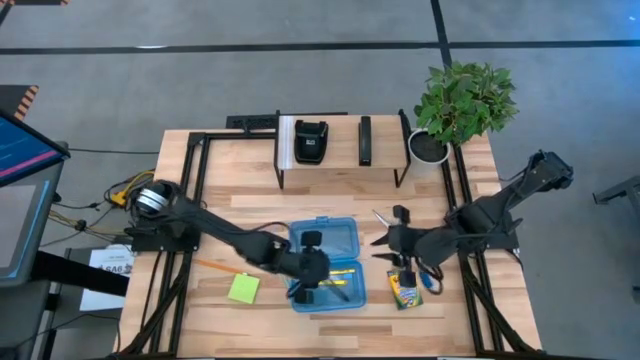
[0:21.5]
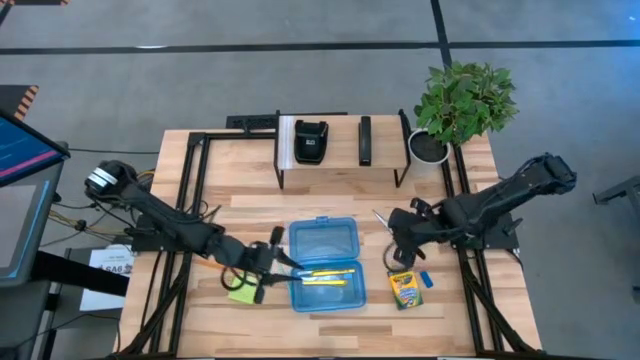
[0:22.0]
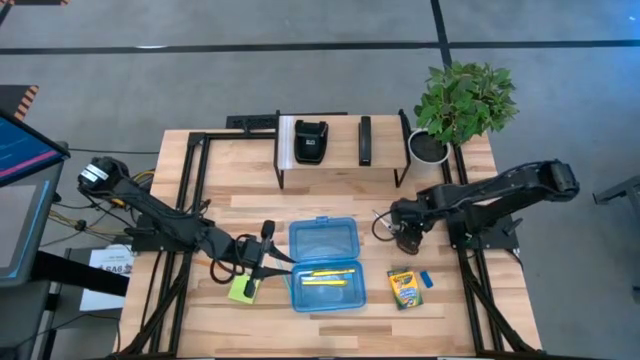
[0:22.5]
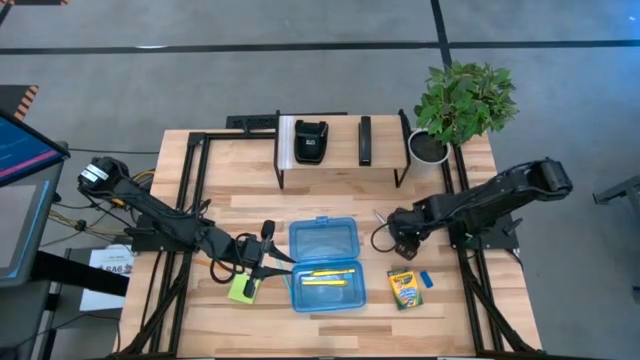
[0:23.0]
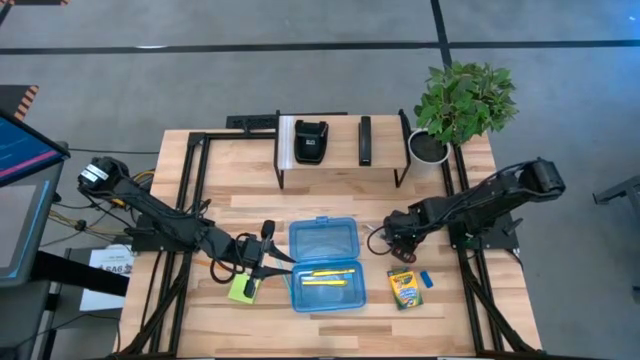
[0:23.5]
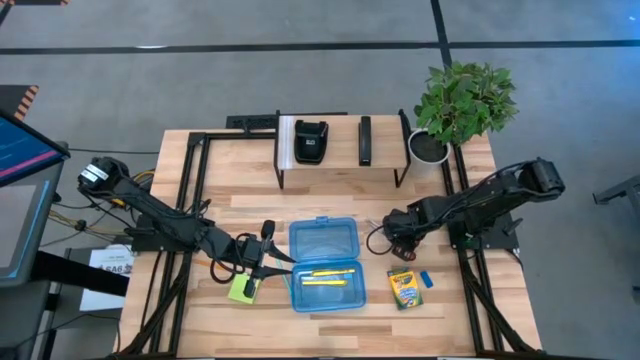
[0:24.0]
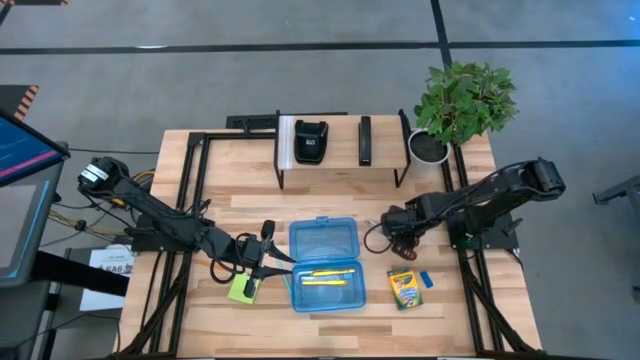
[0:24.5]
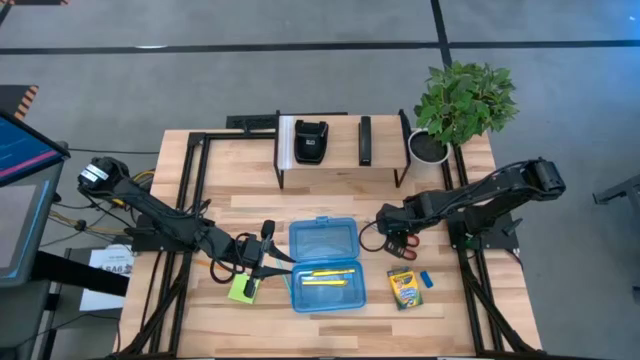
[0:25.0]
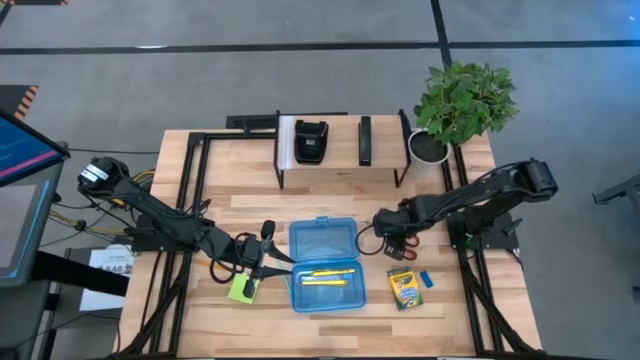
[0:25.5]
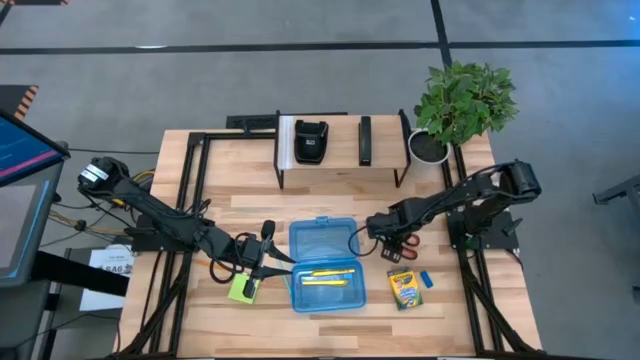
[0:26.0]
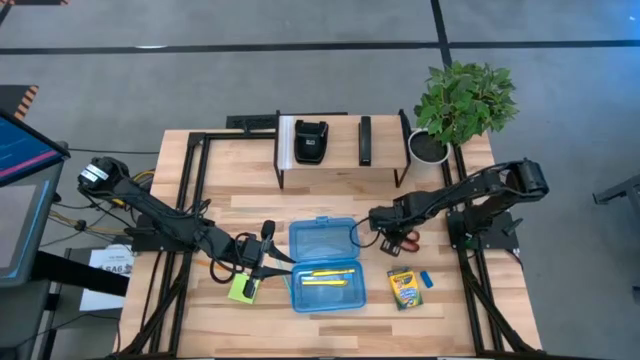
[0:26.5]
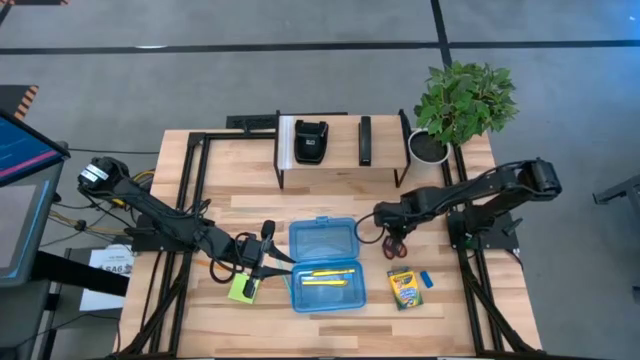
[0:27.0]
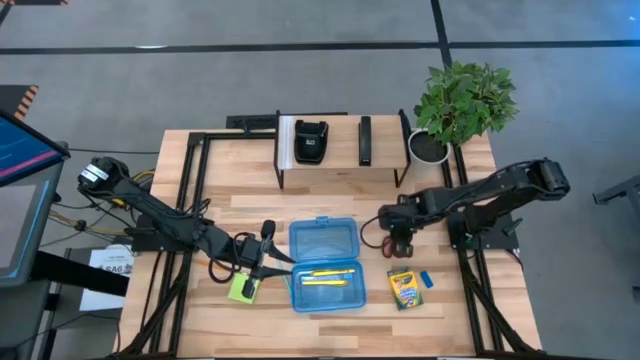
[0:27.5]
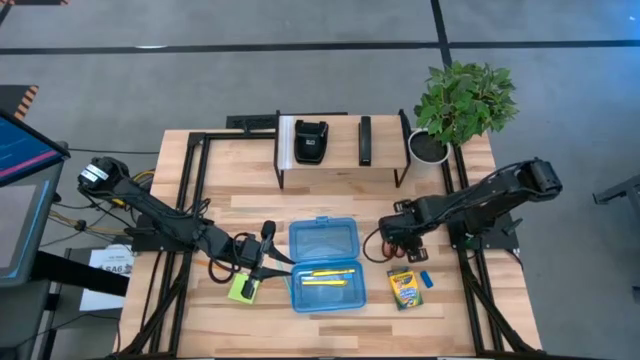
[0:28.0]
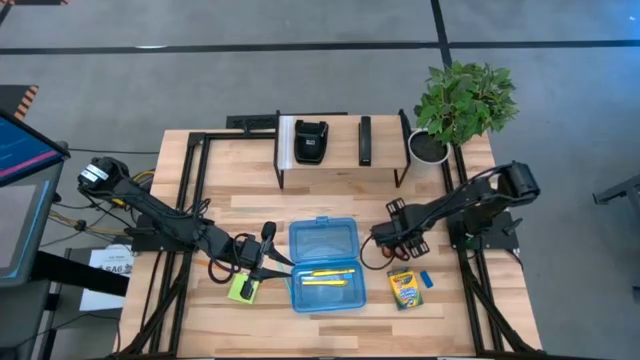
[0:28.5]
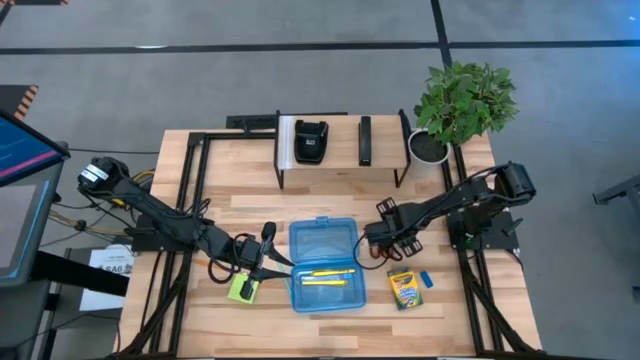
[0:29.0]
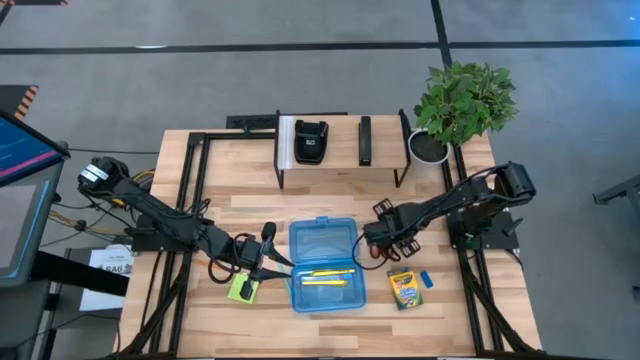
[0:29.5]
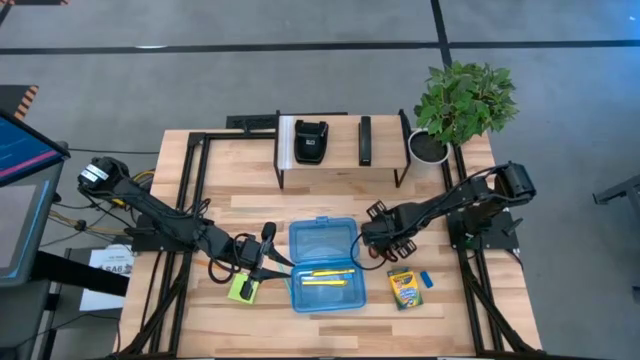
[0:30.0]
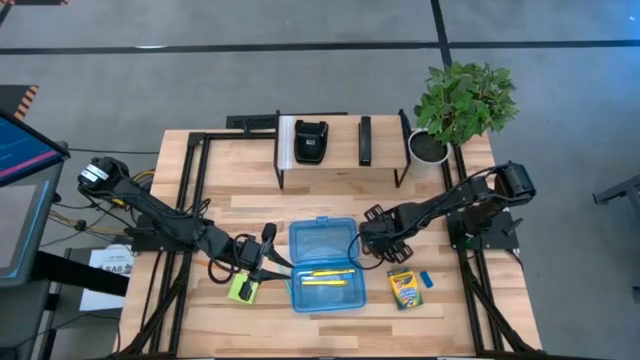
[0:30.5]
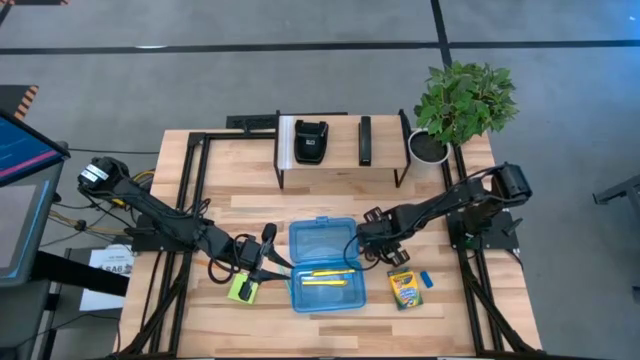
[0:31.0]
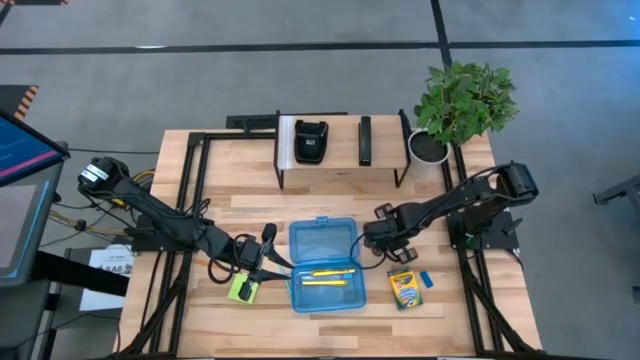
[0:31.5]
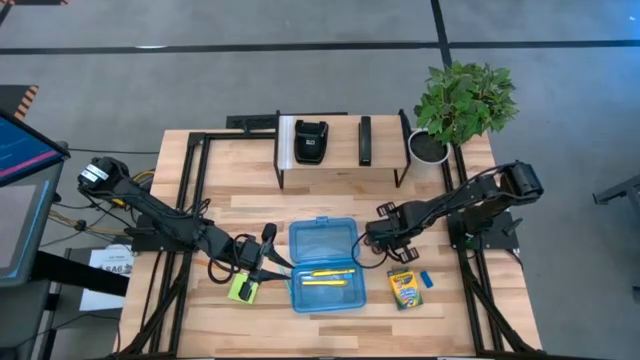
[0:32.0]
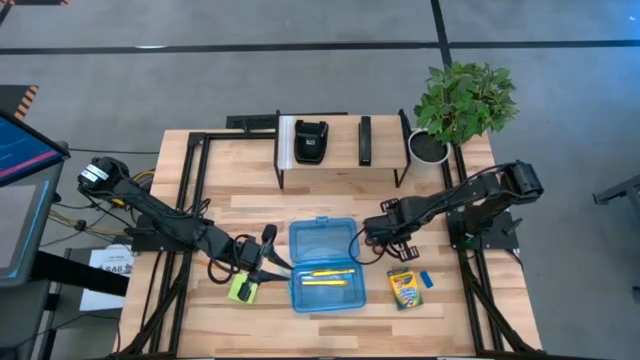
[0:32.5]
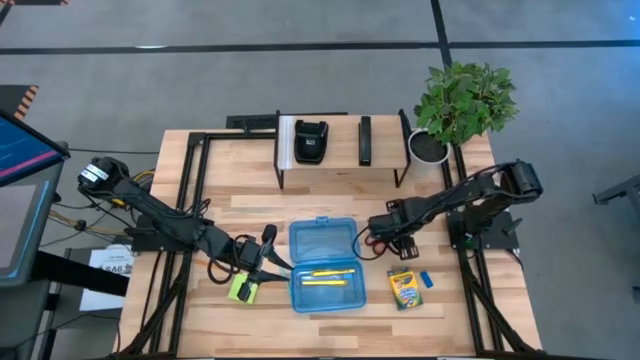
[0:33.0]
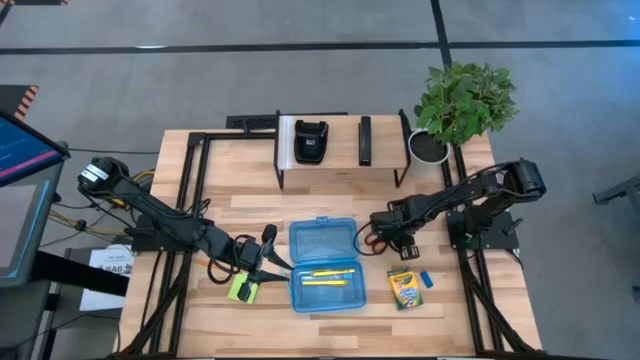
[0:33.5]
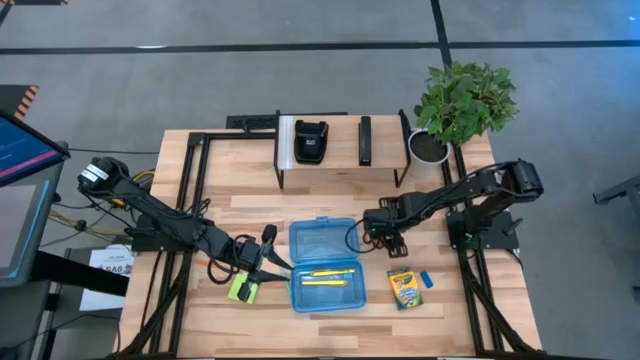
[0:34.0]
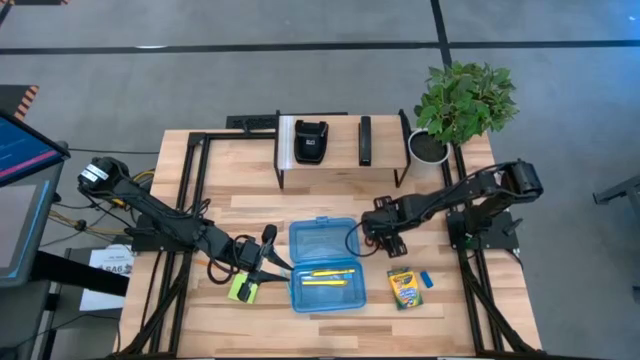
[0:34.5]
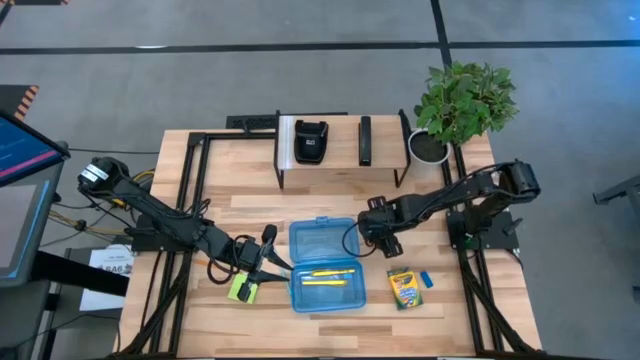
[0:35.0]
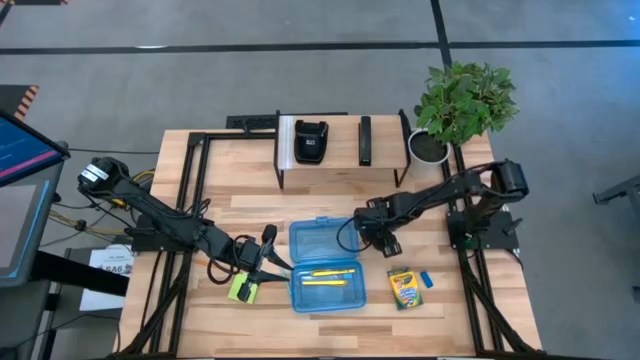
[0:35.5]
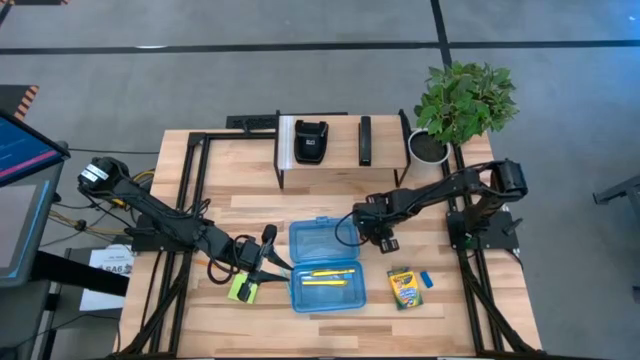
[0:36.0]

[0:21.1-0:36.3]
Task: Pack school essentials
Put the black scissors into the blue supply box

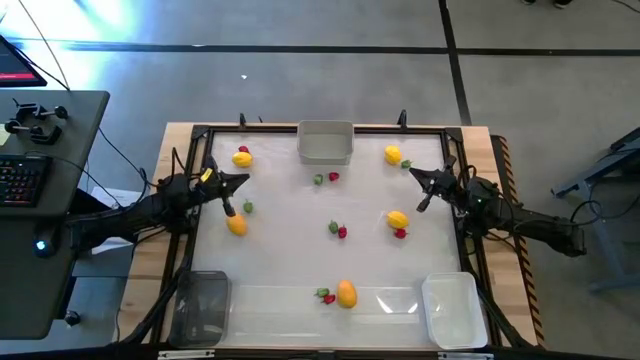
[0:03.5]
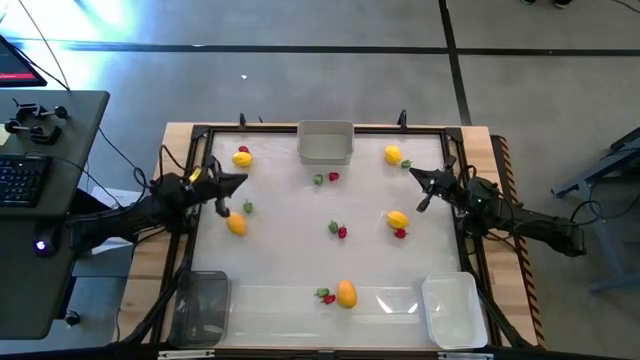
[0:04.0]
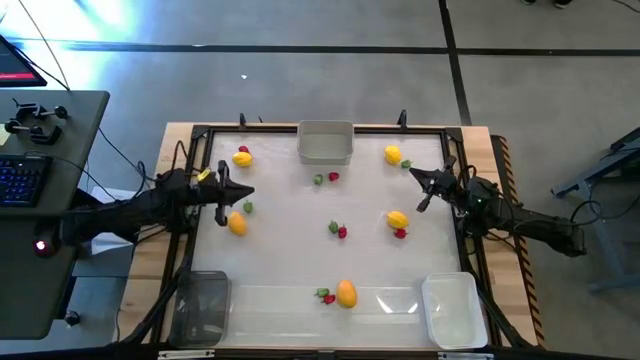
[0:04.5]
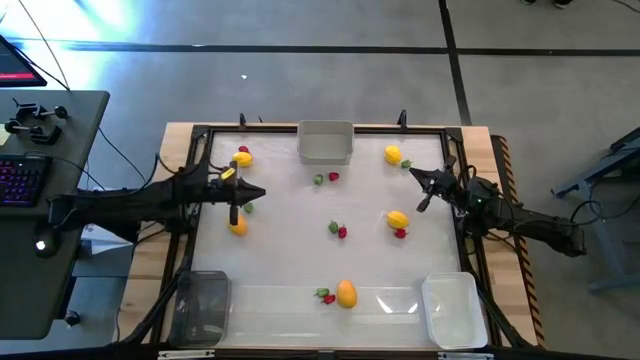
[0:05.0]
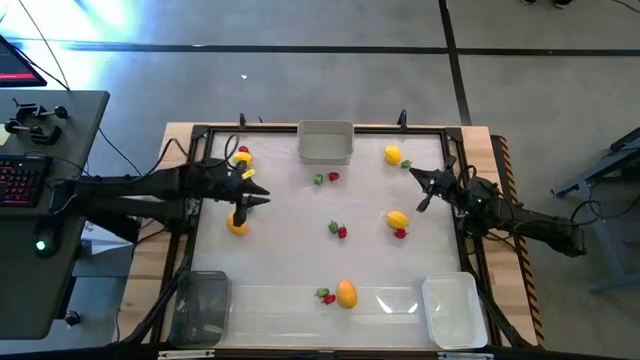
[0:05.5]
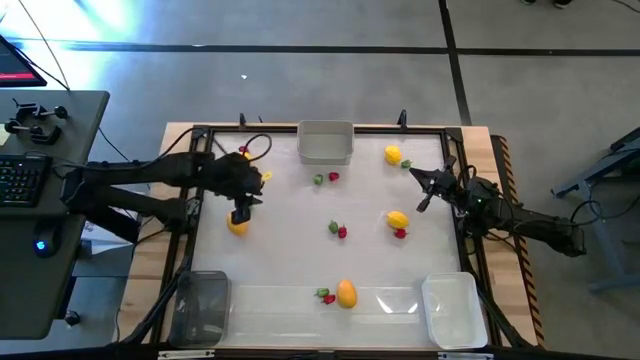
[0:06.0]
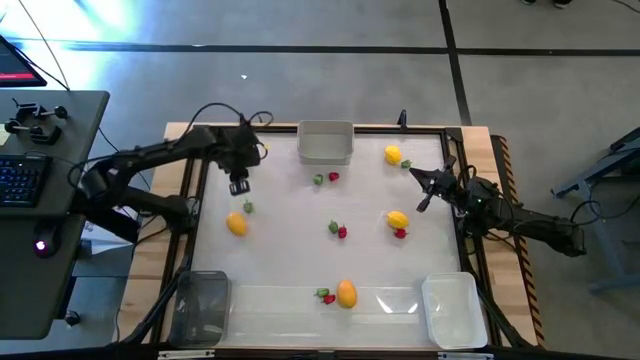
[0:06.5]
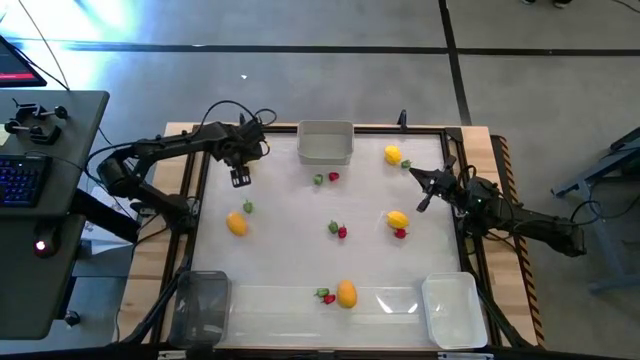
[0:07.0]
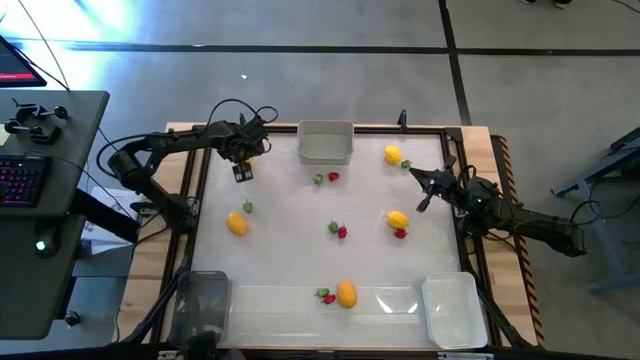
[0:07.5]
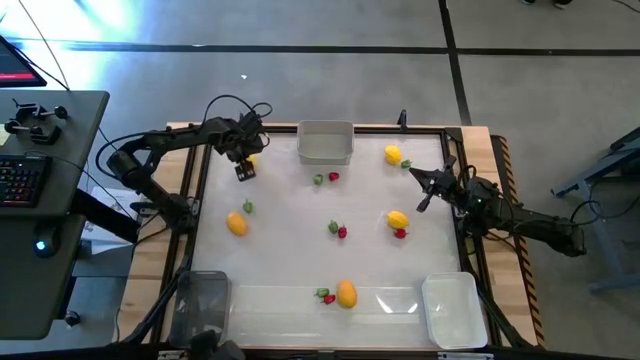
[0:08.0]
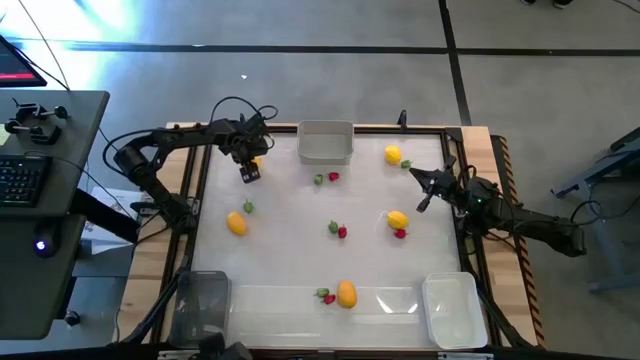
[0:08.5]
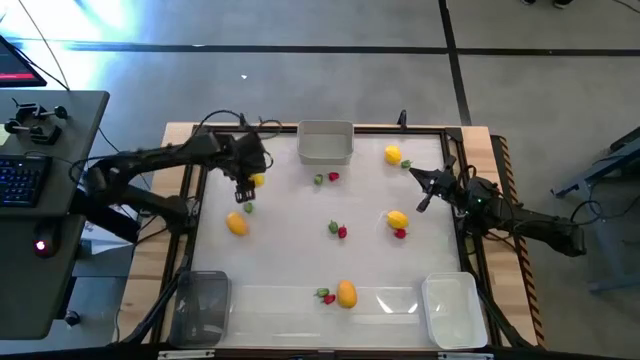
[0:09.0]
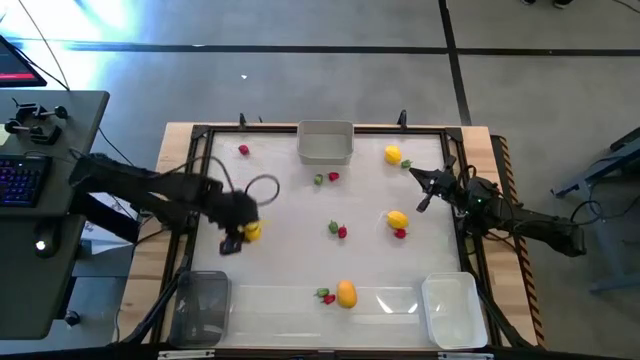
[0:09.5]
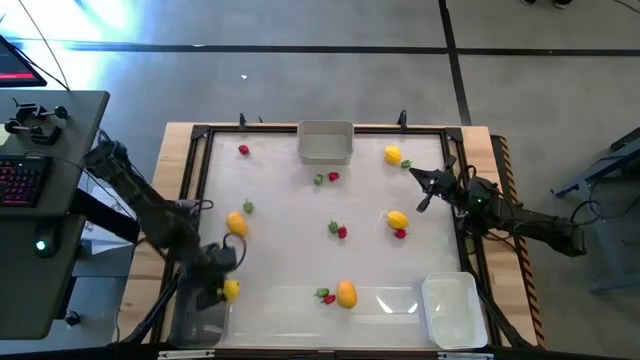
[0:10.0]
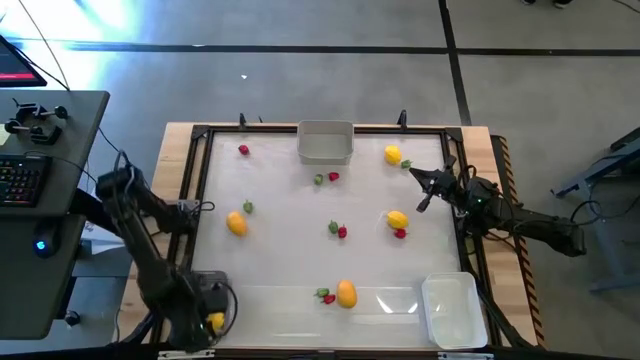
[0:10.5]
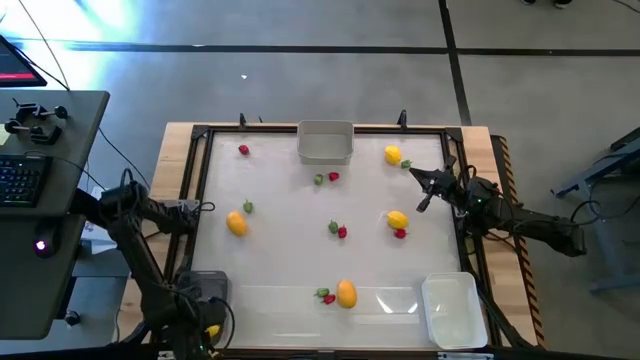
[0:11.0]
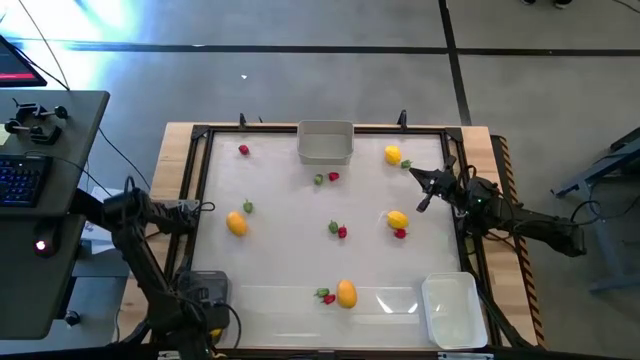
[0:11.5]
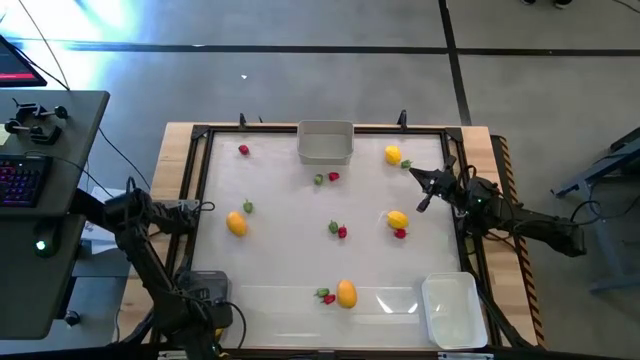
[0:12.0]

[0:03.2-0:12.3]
Task: Sort produce into baskets
Put the lemon into the black bin
